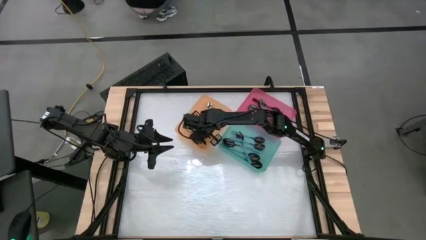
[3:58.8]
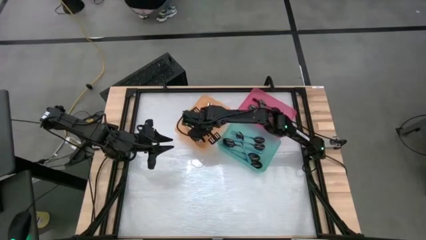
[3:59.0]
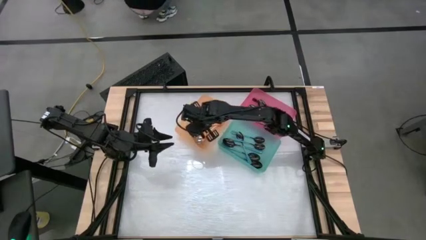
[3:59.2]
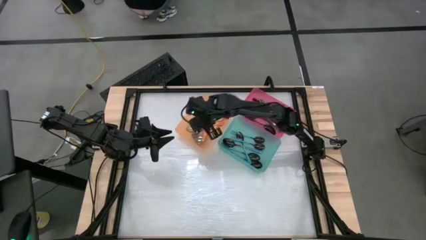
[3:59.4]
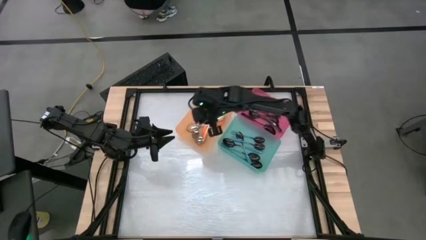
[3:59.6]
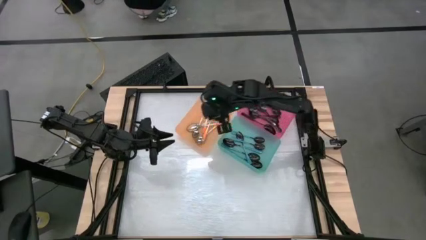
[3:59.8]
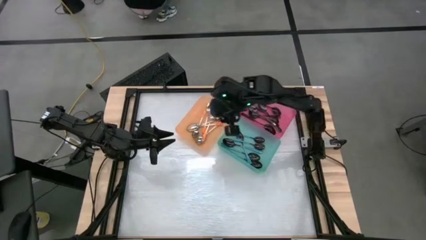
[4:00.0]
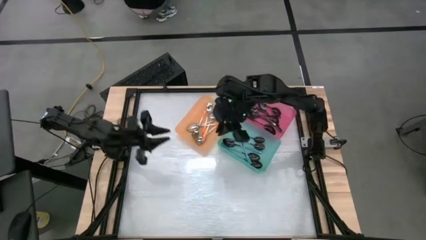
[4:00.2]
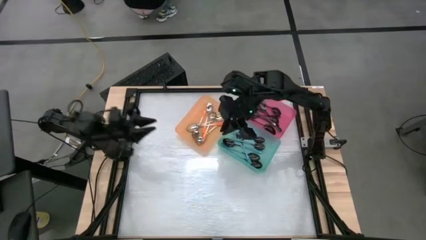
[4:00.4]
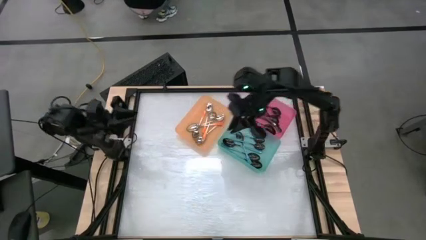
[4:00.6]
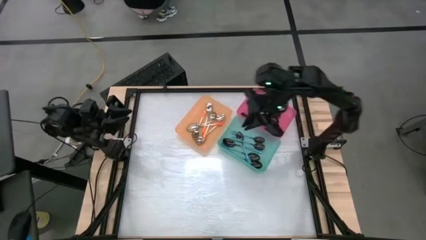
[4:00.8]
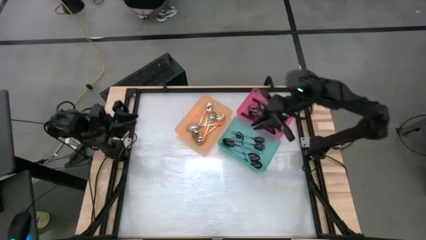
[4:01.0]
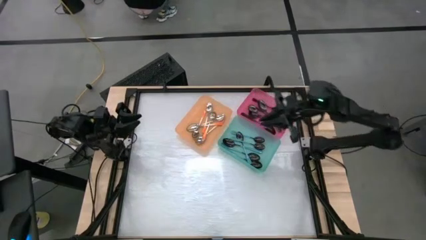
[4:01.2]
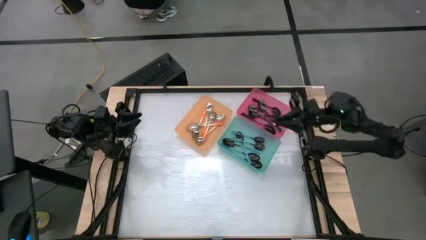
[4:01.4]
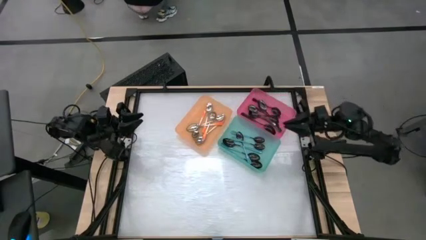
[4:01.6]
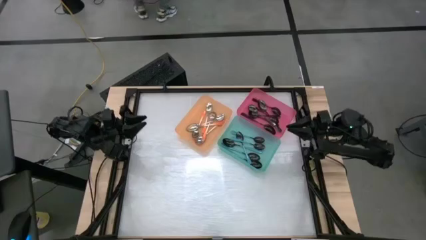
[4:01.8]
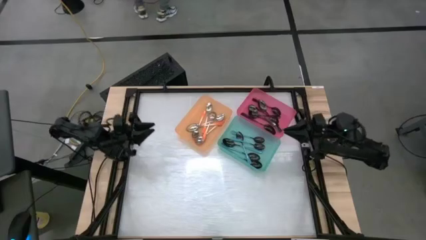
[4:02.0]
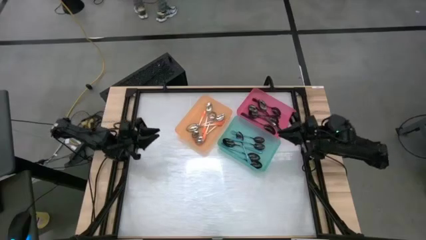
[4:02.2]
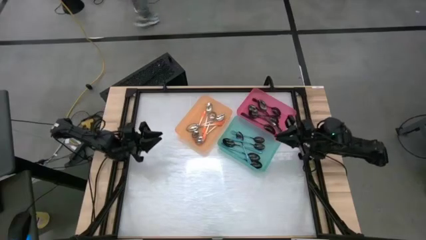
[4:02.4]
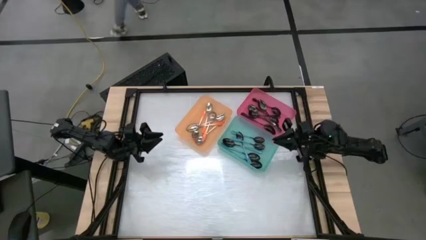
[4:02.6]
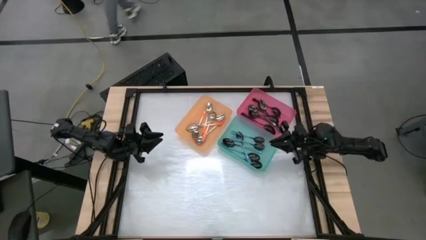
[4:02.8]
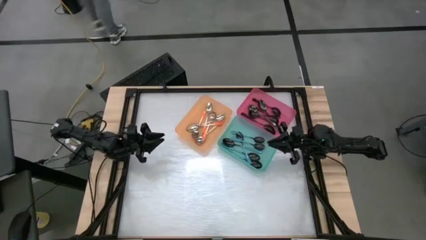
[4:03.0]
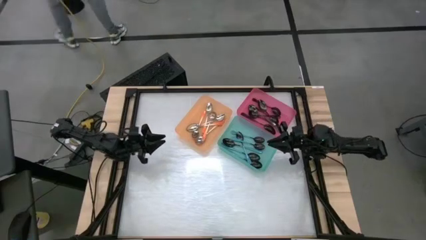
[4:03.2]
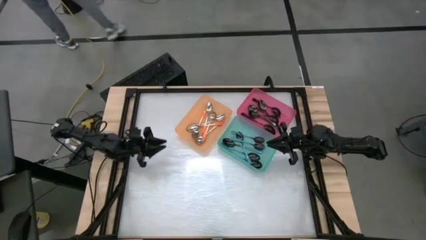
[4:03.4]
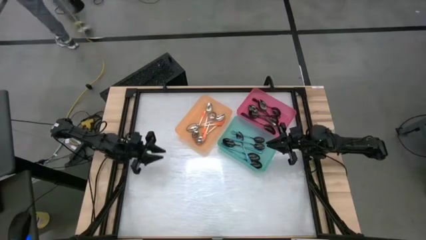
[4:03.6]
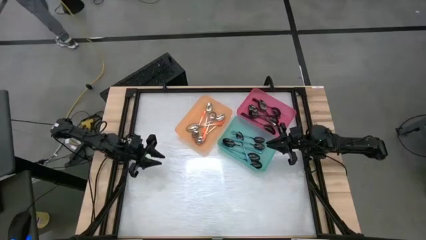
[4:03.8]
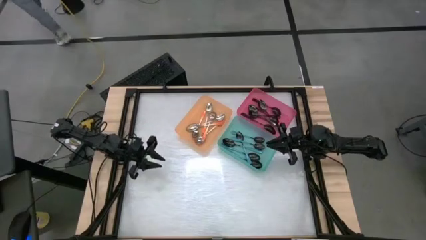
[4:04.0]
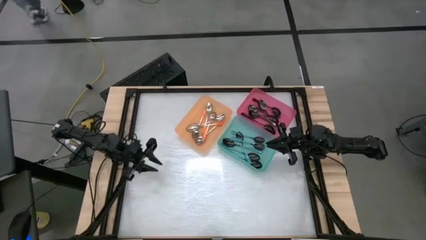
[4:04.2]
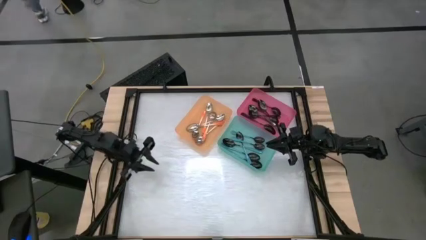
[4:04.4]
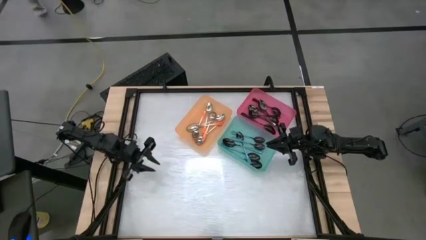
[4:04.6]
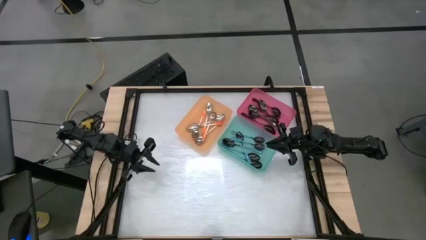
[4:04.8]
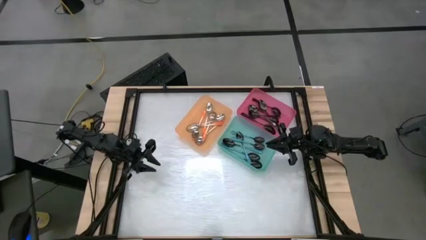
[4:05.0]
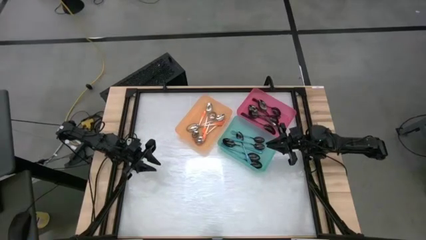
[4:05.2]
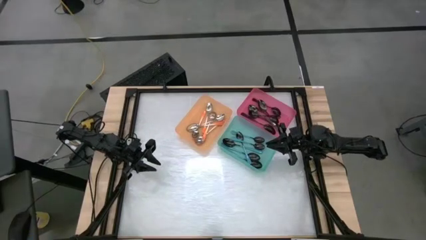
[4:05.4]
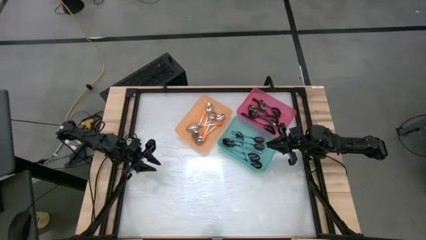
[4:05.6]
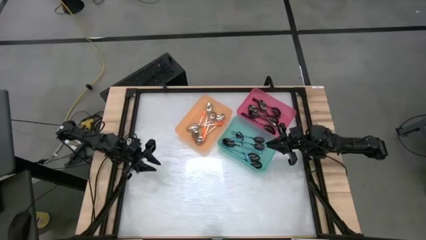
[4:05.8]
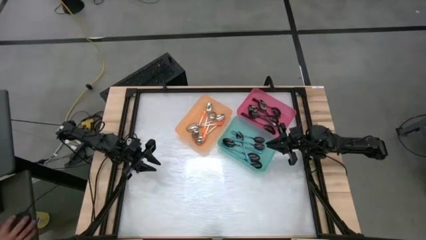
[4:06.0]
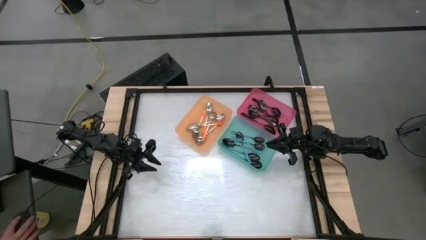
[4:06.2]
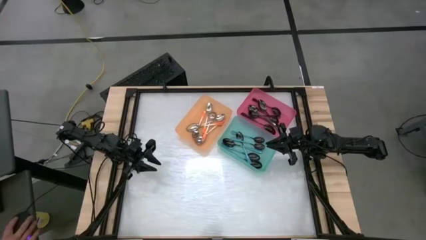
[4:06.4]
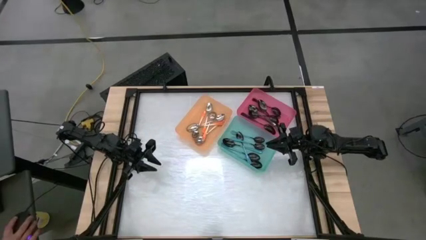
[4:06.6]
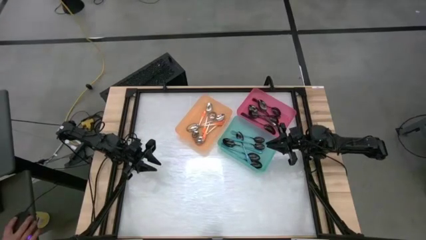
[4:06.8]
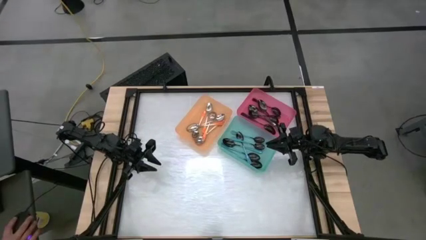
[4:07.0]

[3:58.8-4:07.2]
Task: Sort silverware by color (type)
Return to Home Position

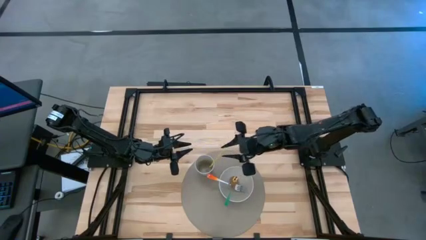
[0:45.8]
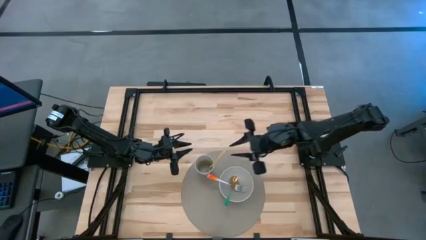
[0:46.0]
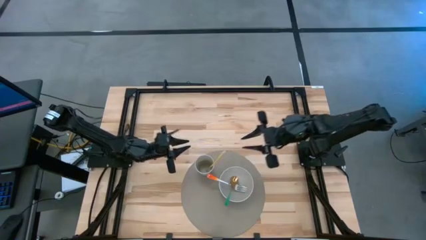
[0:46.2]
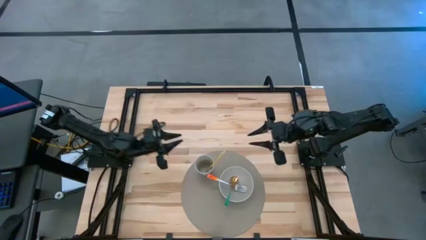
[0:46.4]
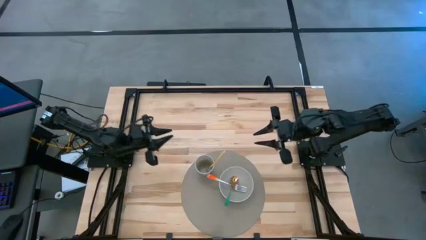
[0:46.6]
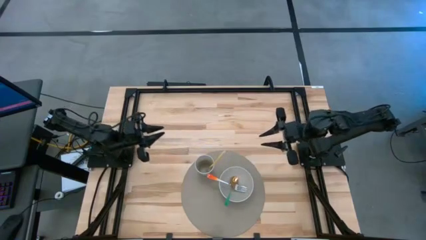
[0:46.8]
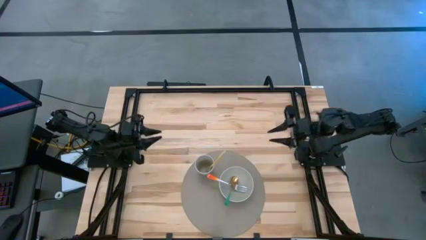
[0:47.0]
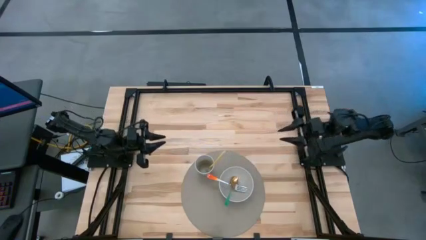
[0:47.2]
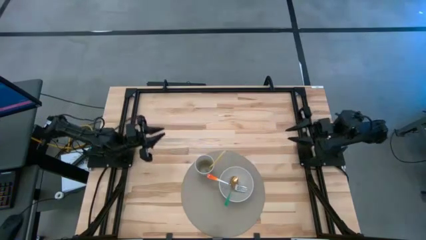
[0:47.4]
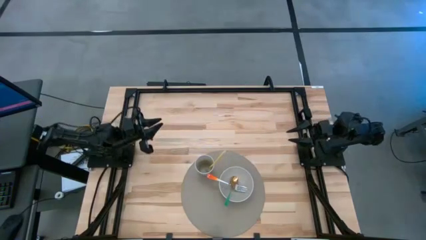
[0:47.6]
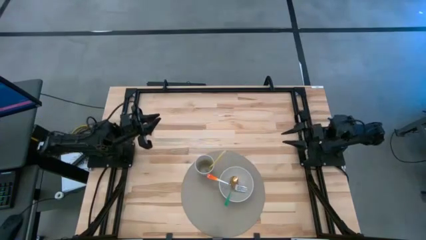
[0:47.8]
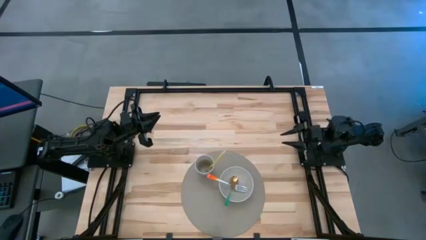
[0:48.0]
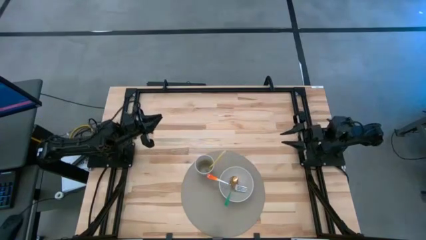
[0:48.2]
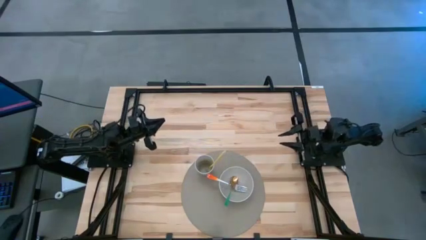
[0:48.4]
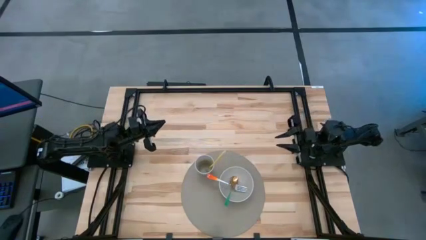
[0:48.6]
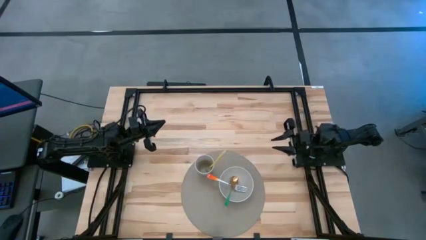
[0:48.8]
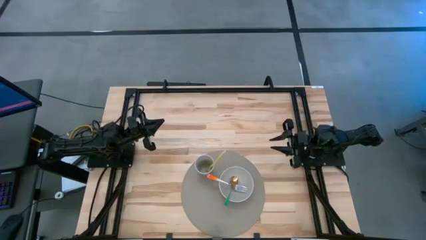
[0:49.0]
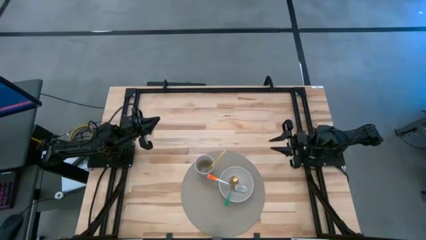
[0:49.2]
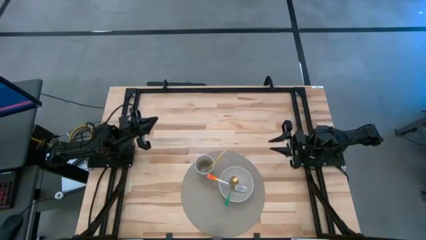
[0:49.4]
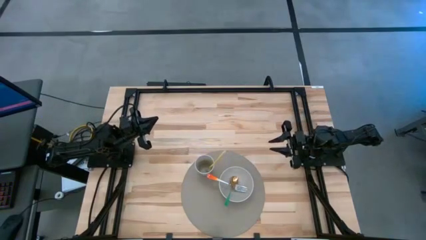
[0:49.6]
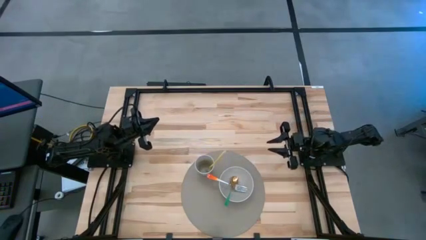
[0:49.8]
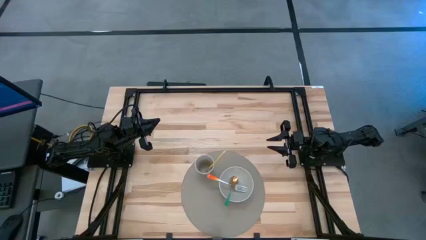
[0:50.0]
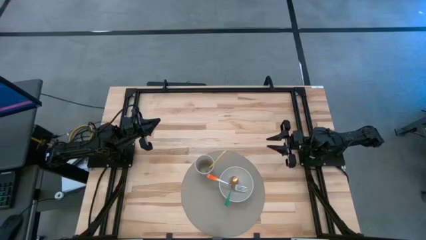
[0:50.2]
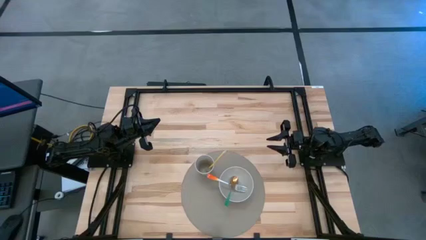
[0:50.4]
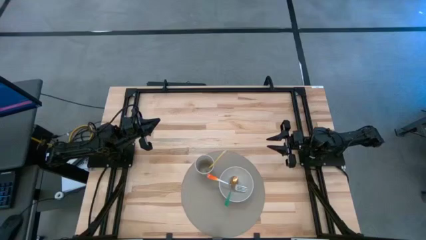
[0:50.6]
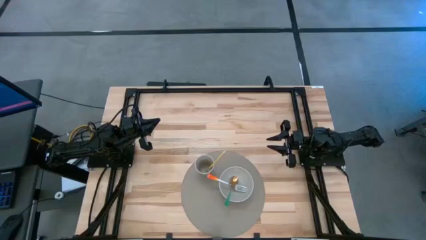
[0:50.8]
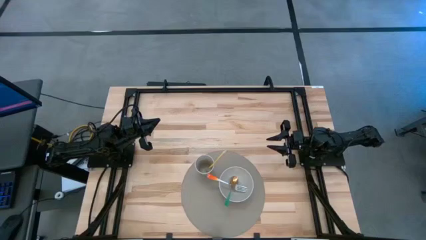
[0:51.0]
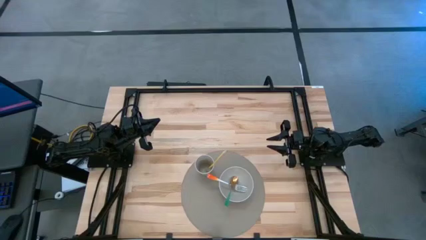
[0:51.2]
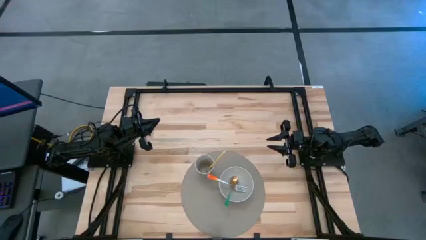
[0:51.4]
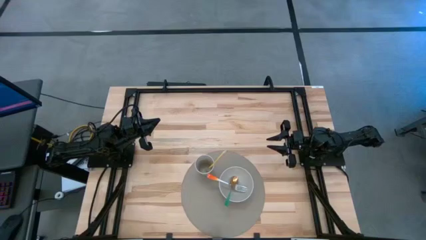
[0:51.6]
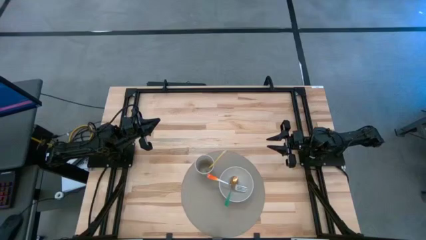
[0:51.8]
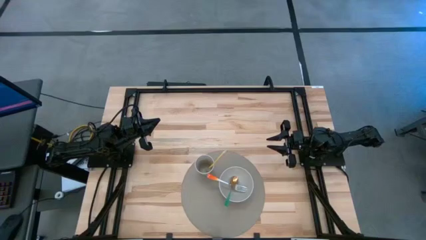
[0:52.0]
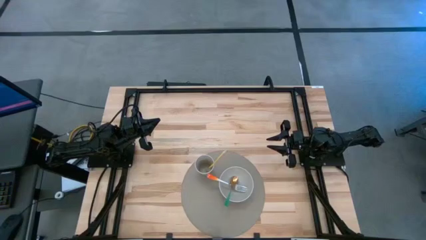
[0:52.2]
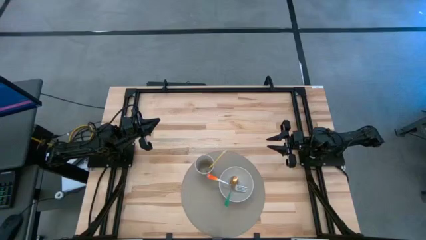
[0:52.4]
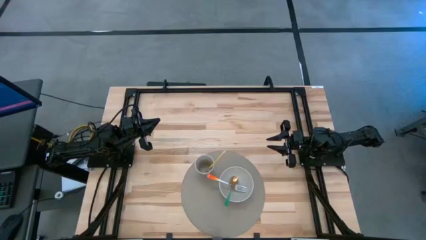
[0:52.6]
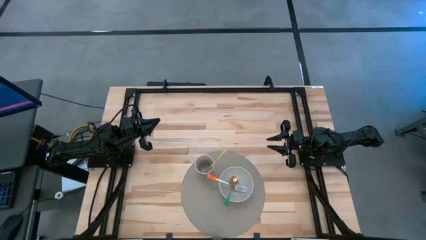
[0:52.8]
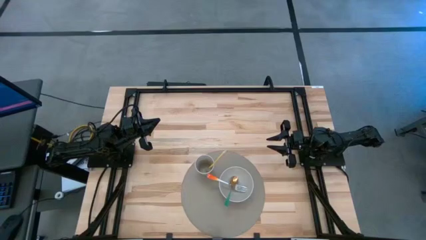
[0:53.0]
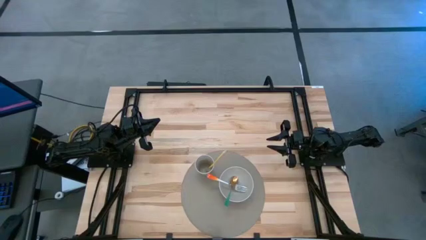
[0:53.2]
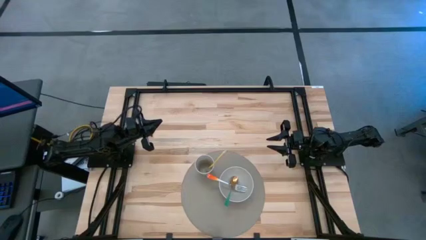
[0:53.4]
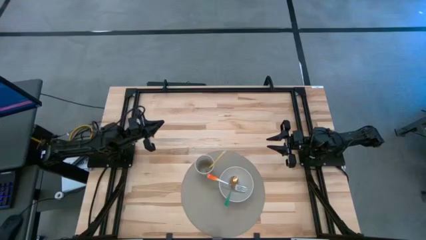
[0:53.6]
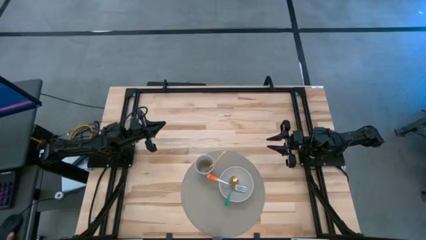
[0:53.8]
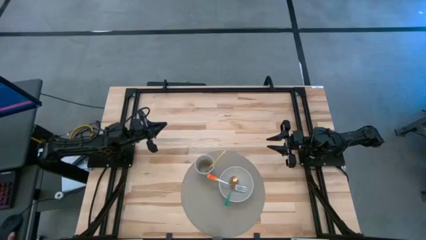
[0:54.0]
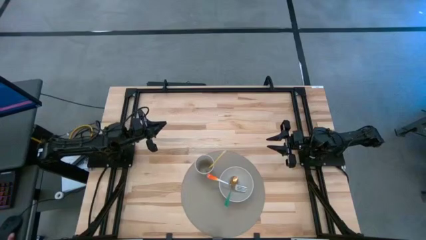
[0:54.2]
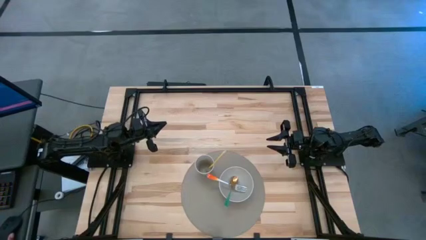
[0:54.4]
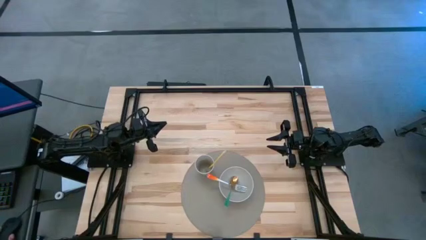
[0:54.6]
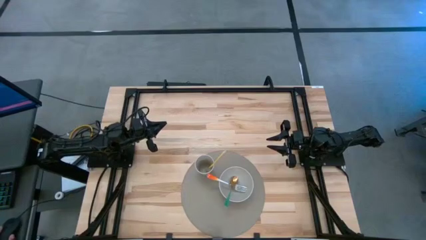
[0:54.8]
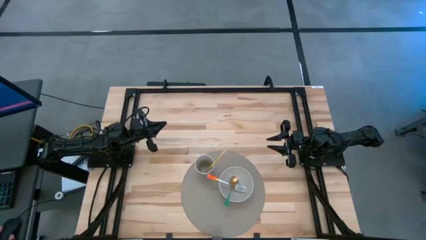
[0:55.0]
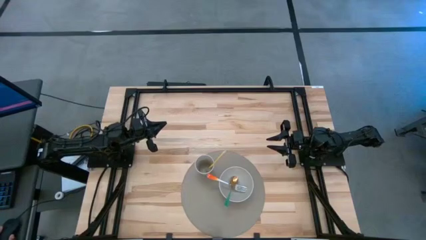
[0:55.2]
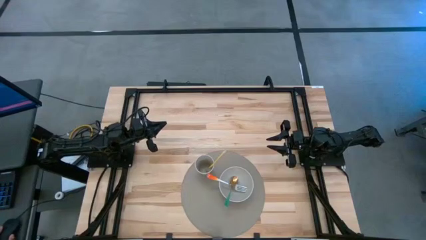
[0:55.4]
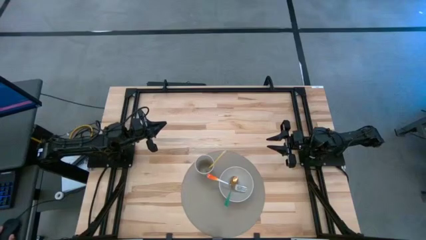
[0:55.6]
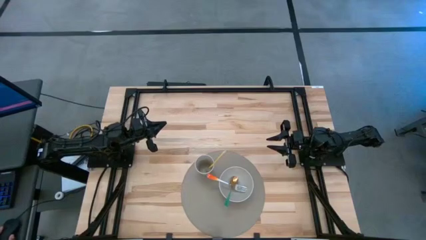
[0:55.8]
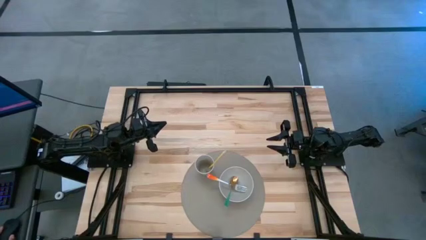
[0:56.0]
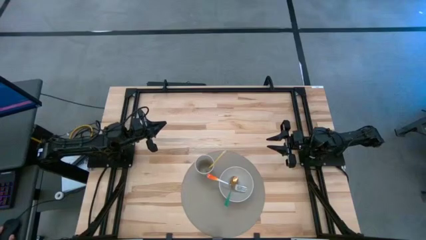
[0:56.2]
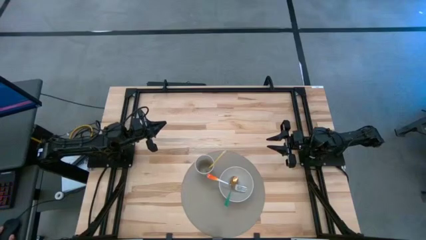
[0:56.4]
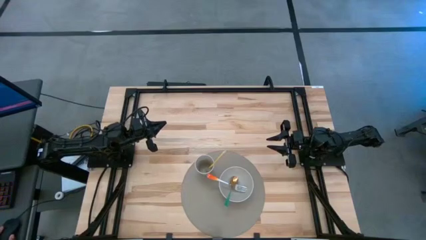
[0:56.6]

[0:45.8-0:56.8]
Task: Pick & Place Utensil
Return to Home Position
